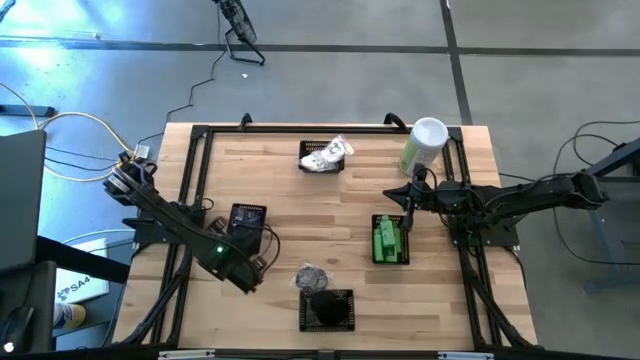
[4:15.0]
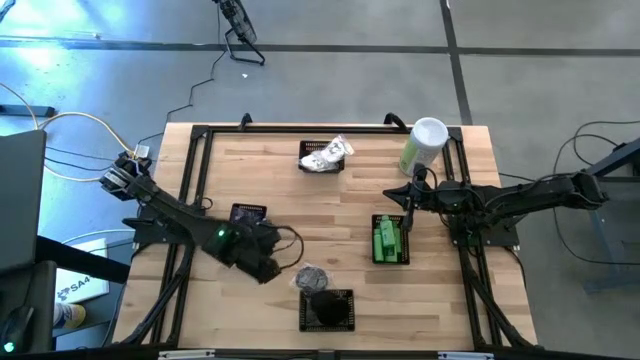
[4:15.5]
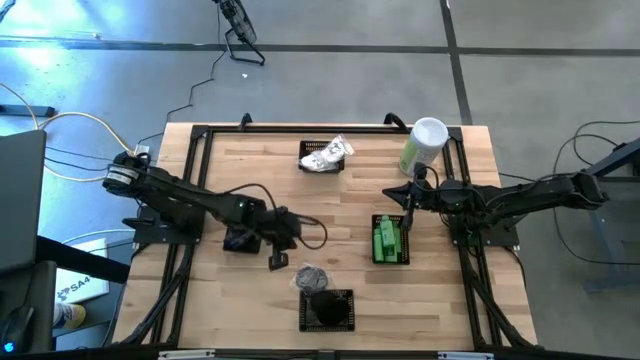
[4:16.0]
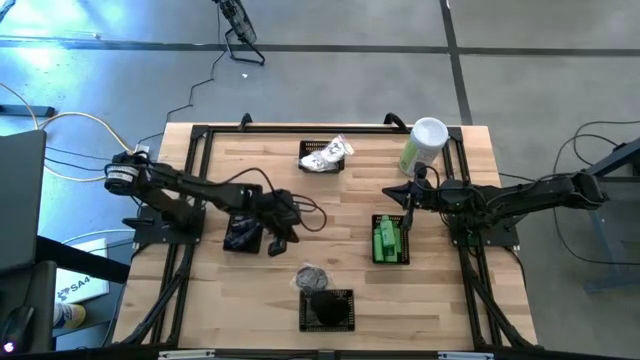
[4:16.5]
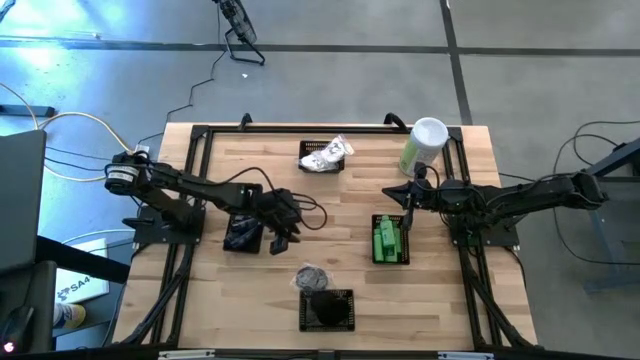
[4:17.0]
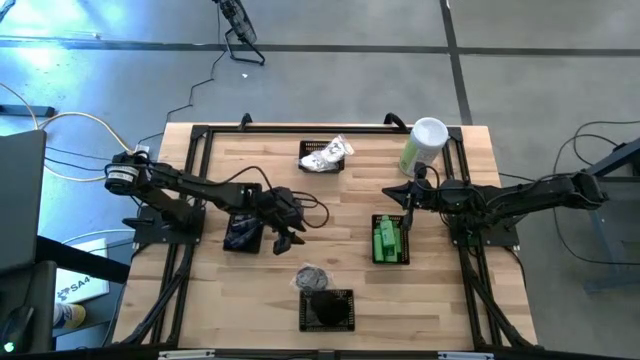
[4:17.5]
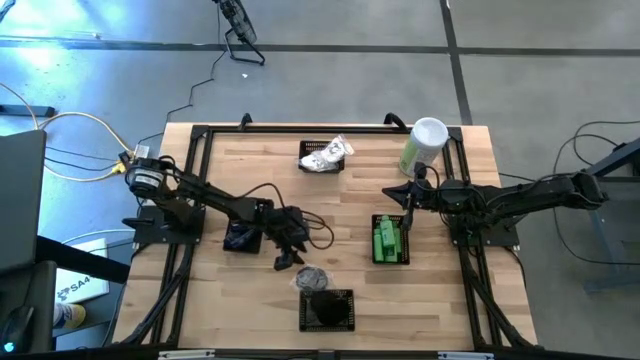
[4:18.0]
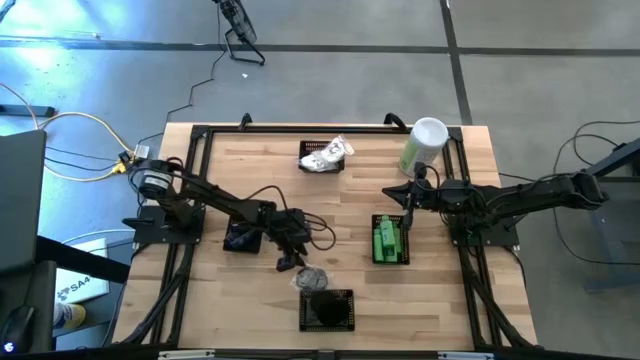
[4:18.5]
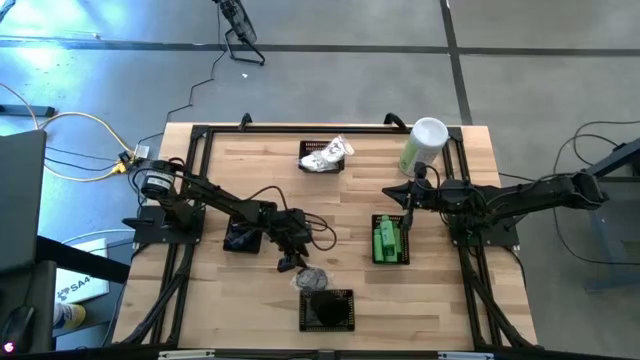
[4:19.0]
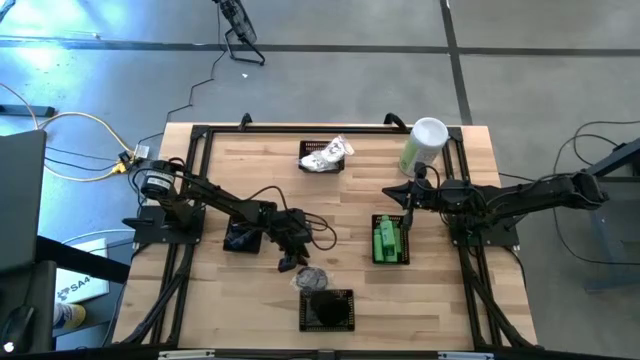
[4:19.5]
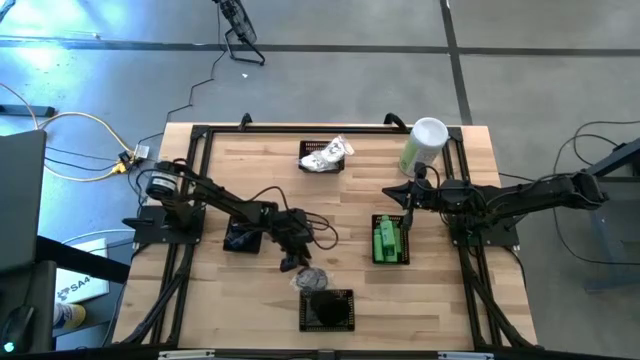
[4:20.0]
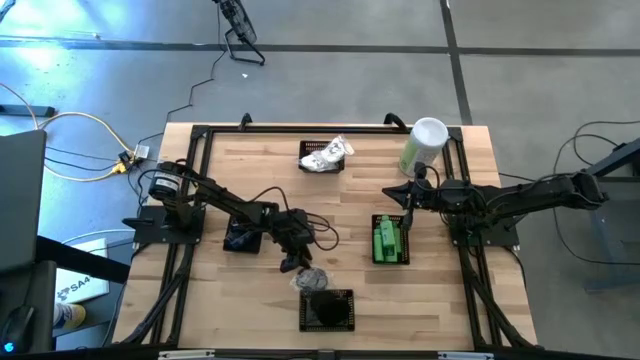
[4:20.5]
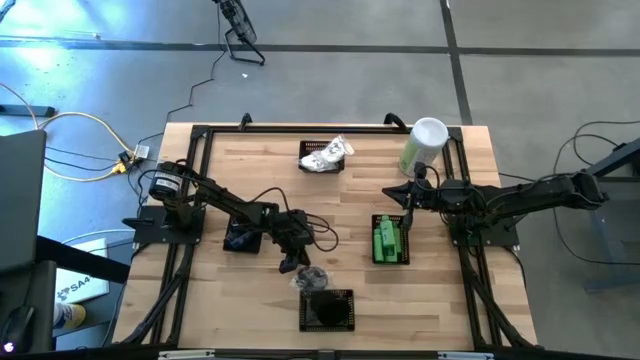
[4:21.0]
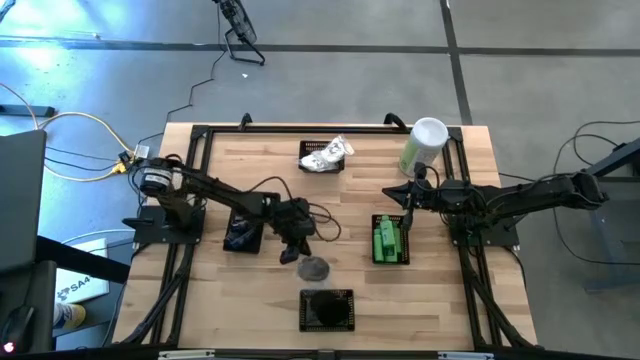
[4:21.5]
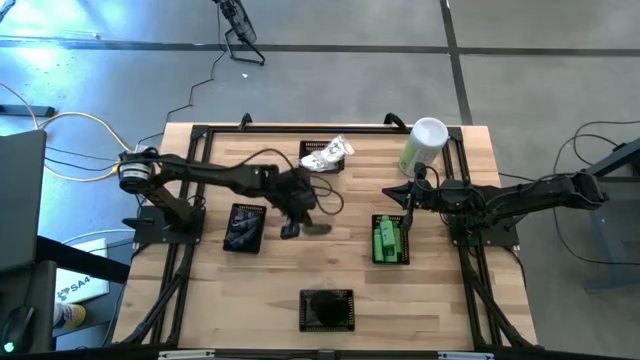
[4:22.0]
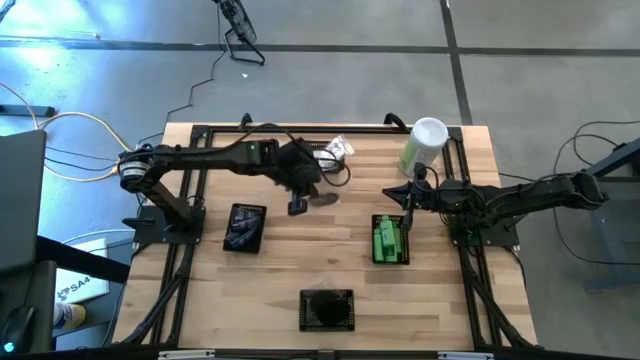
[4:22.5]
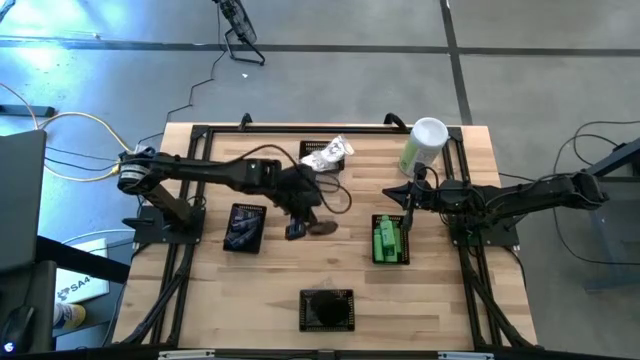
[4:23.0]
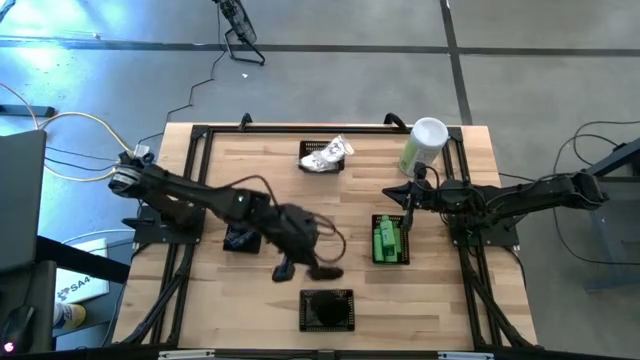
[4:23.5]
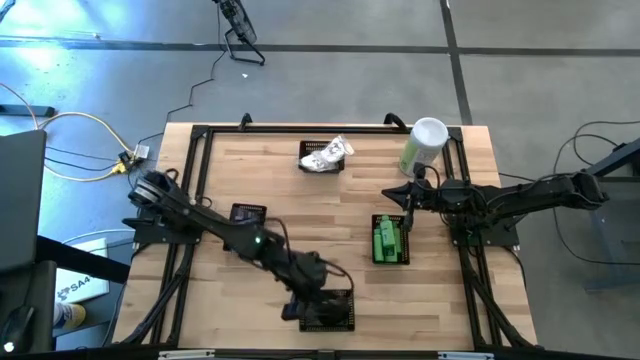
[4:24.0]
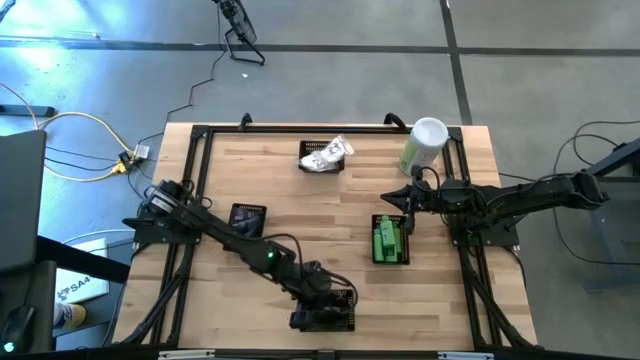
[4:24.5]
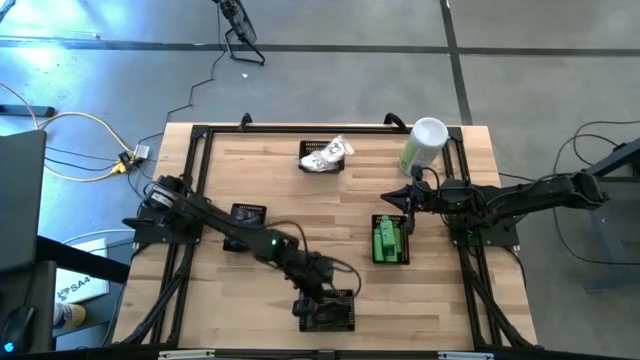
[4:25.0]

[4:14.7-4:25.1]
Task: Pick & Place Travel size toiletries
Put the black brush into the bottom middle black bin

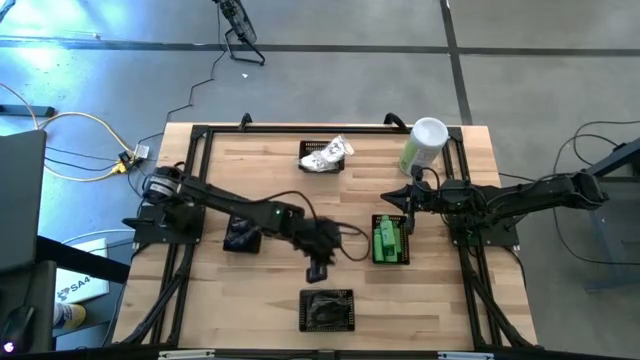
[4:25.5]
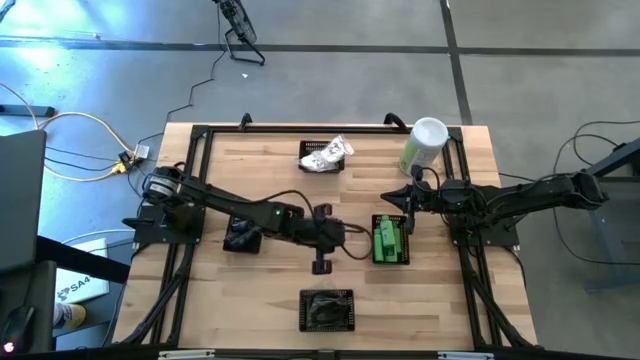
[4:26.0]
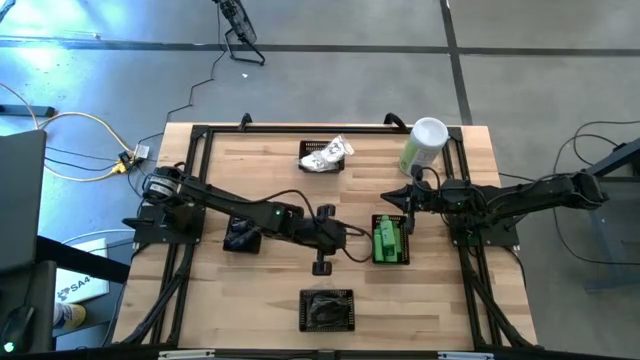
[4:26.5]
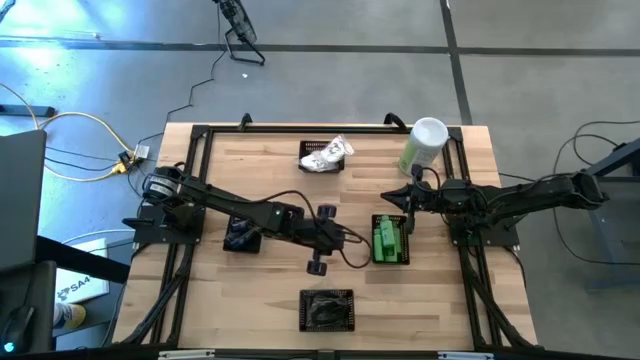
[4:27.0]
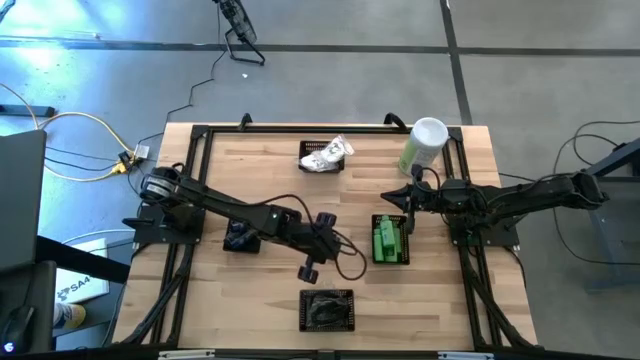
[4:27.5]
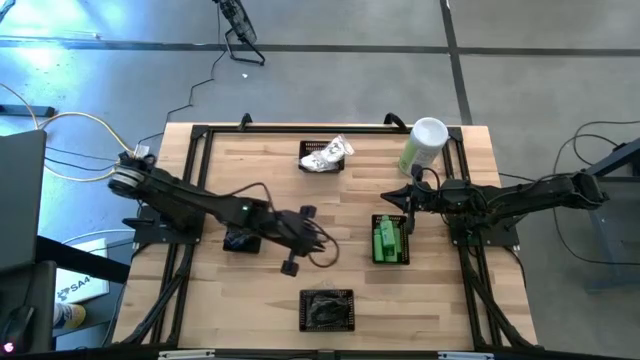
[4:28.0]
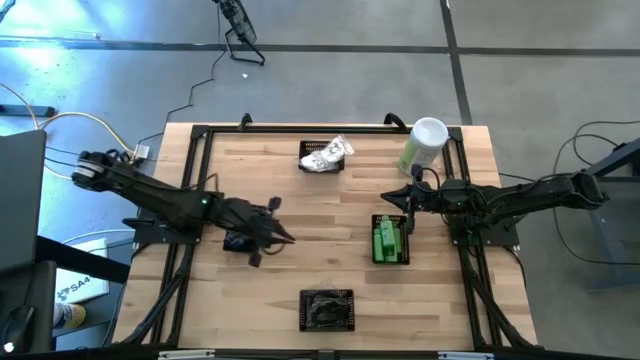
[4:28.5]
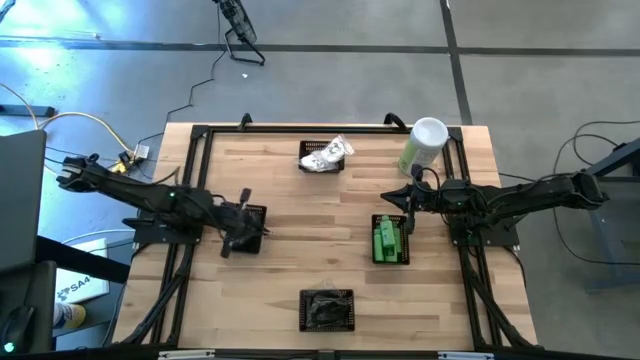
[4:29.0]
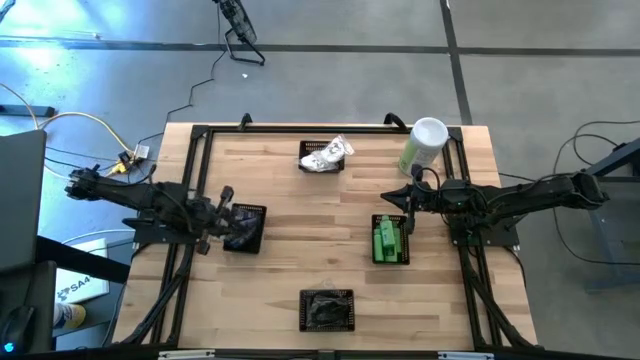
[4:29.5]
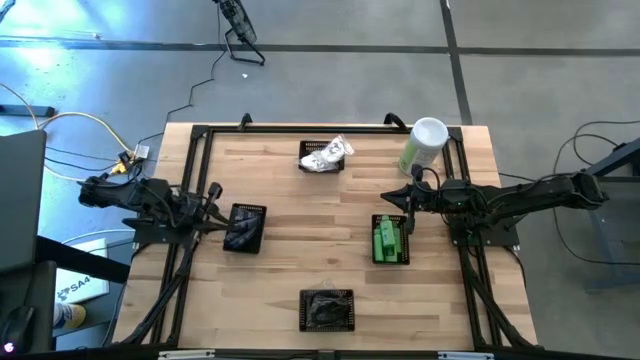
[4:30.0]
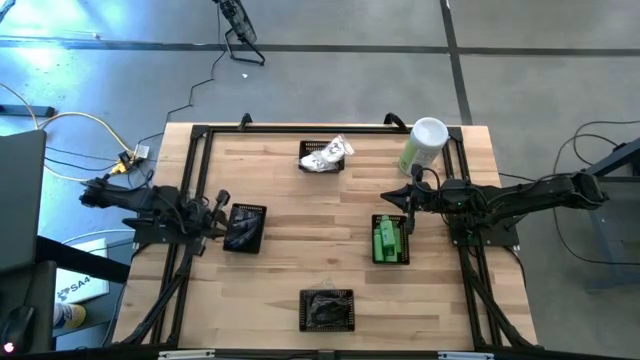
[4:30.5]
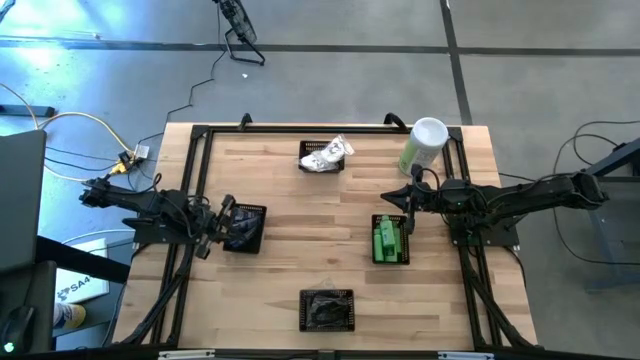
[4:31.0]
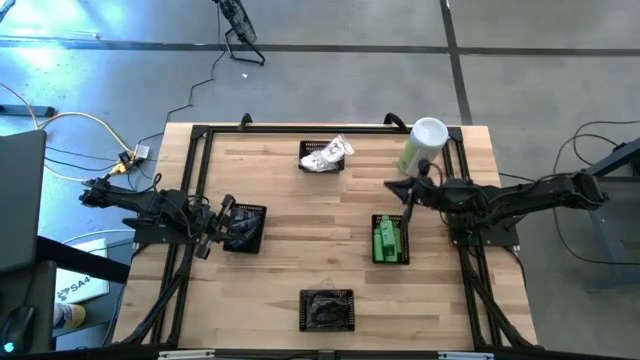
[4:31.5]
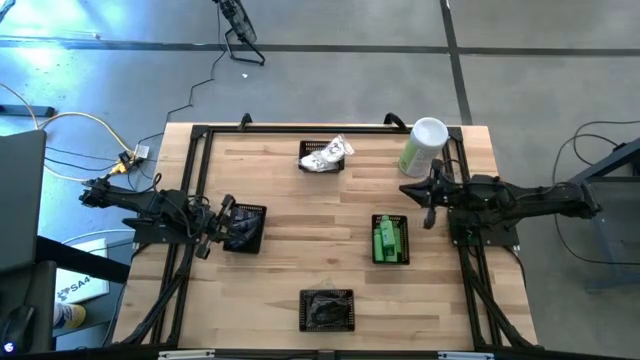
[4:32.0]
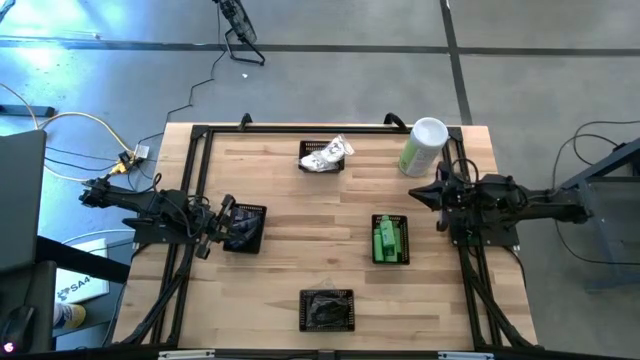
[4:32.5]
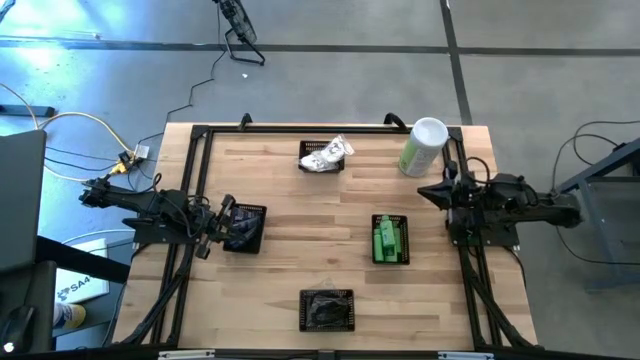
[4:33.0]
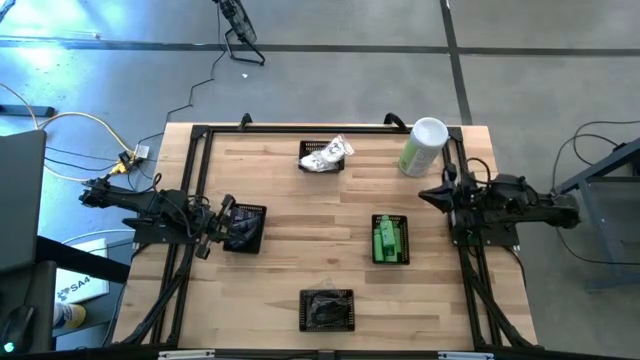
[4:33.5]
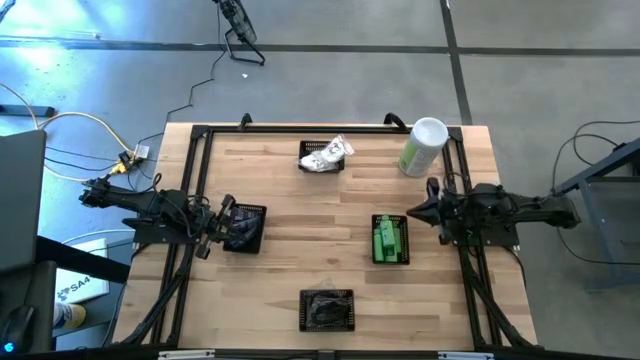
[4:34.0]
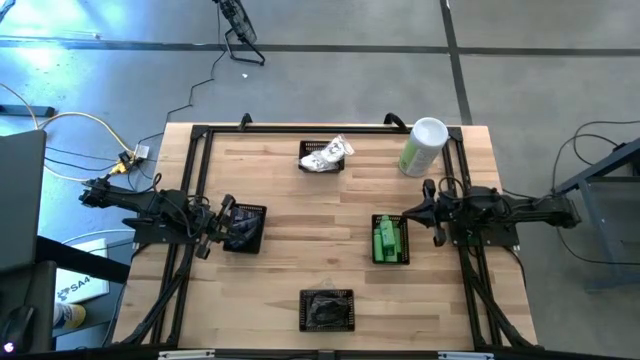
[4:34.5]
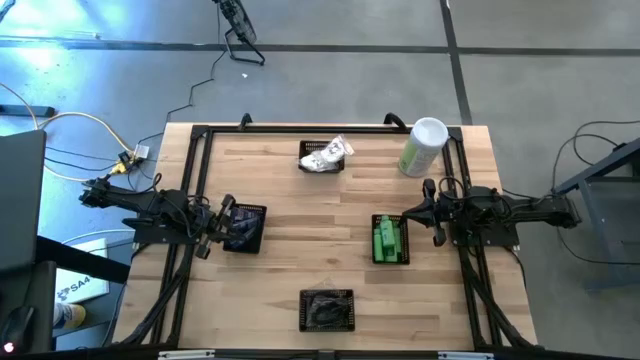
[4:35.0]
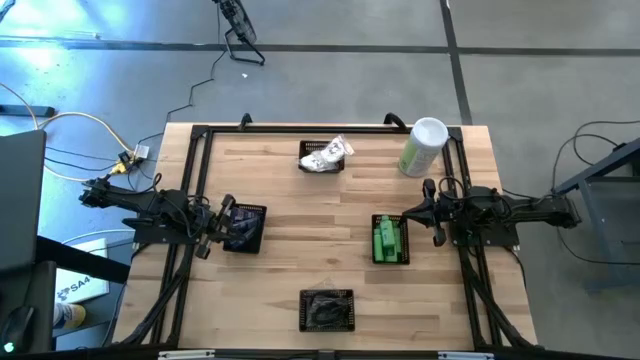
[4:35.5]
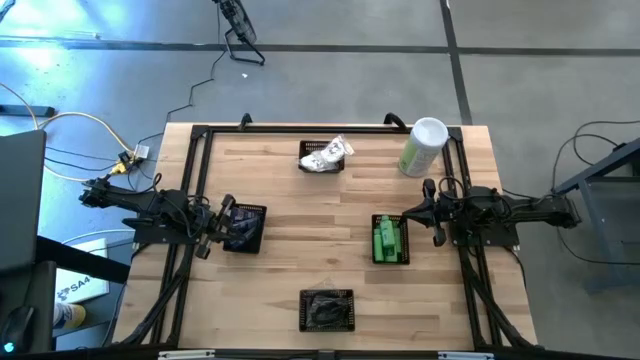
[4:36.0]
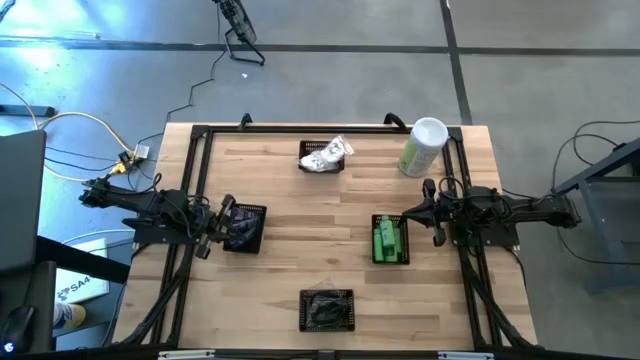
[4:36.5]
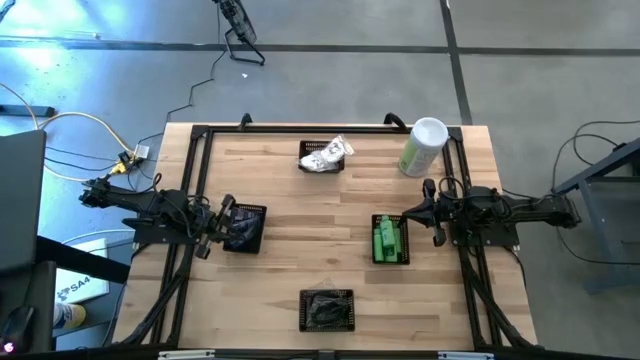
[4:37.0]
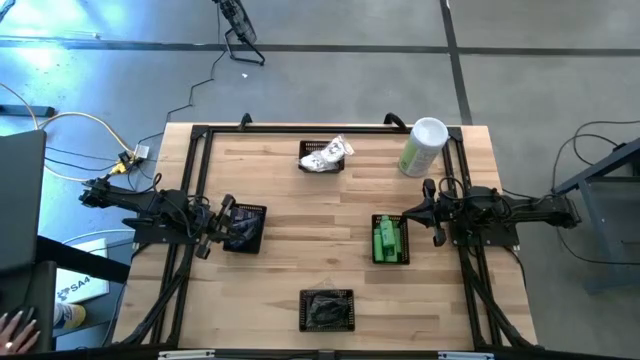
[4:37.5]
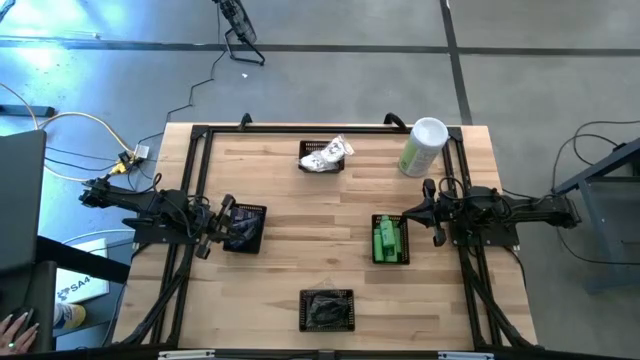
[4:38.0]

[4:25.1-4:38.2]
Return to Home Position
